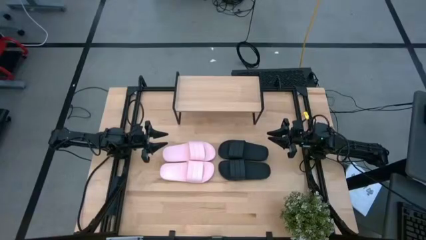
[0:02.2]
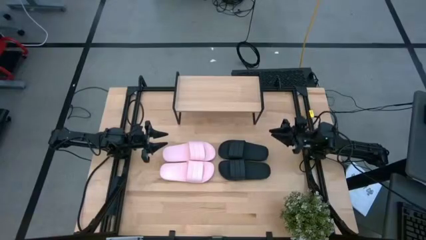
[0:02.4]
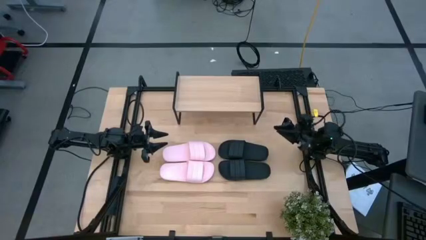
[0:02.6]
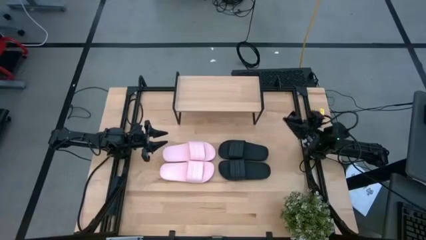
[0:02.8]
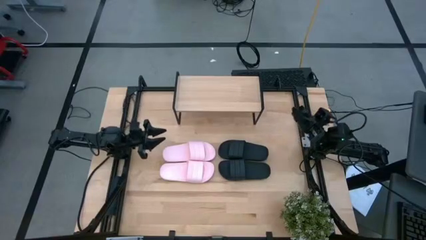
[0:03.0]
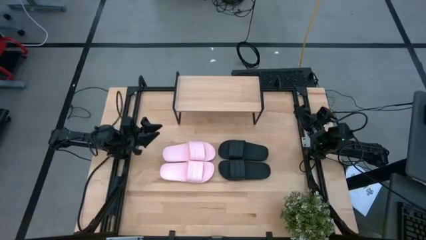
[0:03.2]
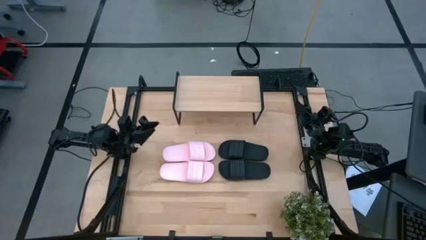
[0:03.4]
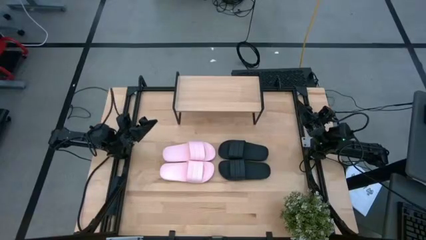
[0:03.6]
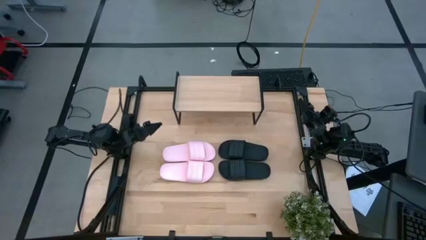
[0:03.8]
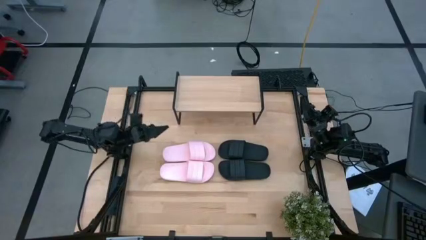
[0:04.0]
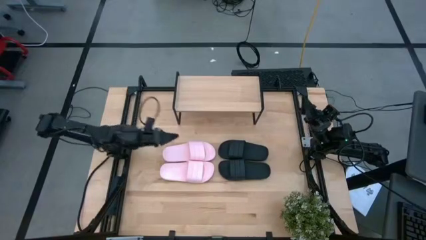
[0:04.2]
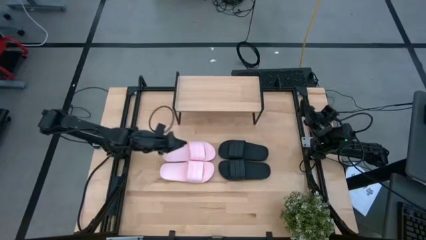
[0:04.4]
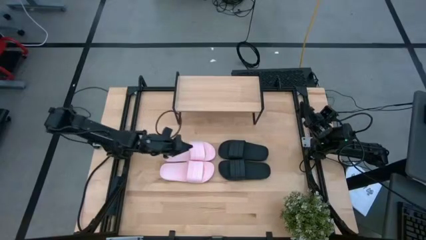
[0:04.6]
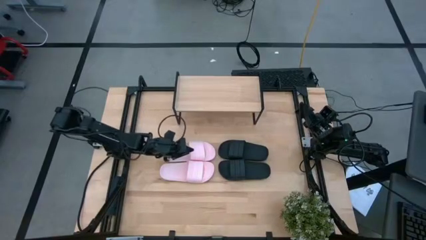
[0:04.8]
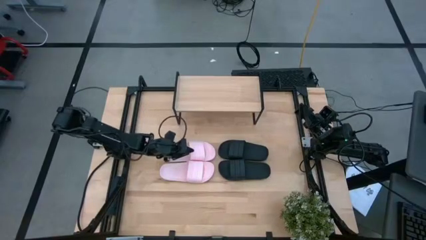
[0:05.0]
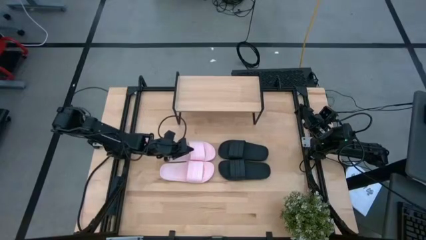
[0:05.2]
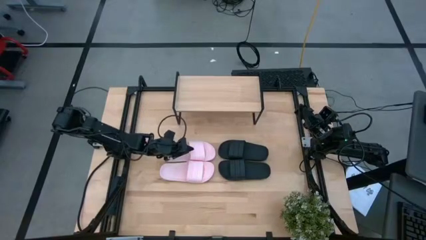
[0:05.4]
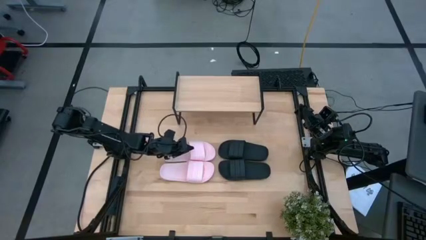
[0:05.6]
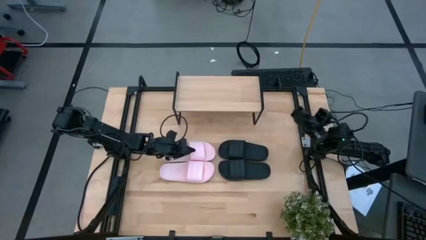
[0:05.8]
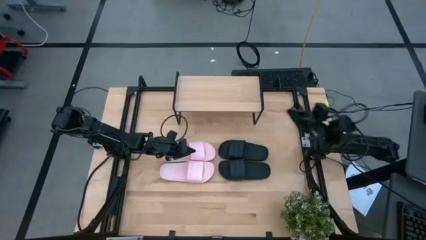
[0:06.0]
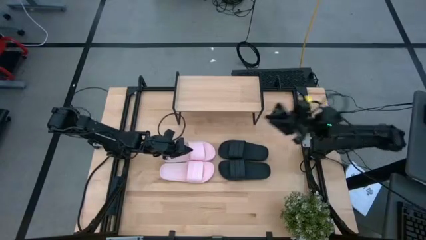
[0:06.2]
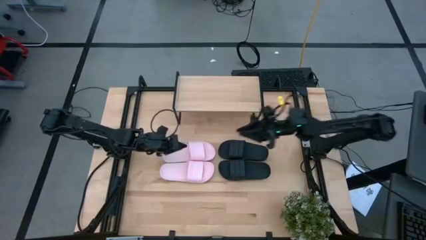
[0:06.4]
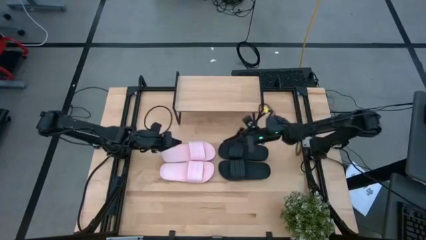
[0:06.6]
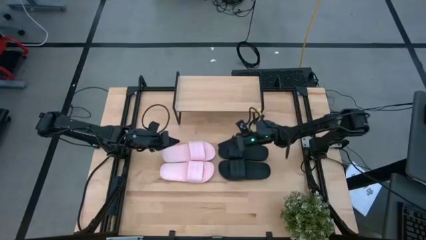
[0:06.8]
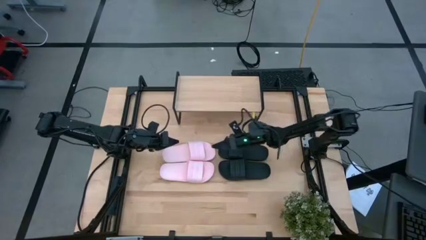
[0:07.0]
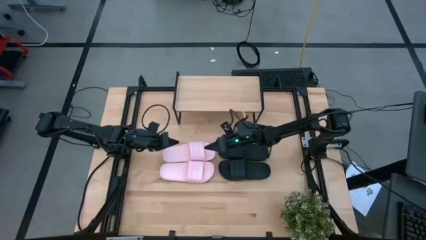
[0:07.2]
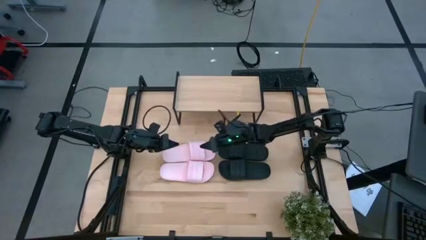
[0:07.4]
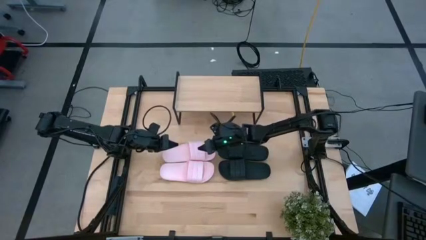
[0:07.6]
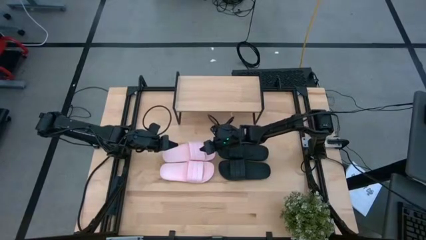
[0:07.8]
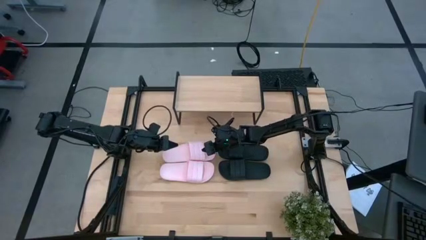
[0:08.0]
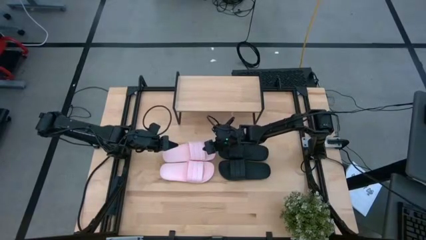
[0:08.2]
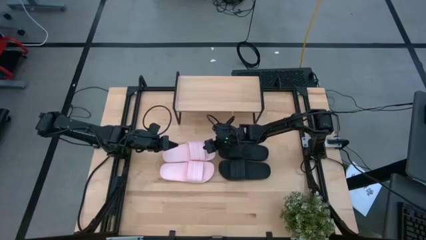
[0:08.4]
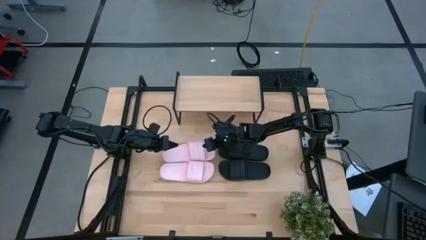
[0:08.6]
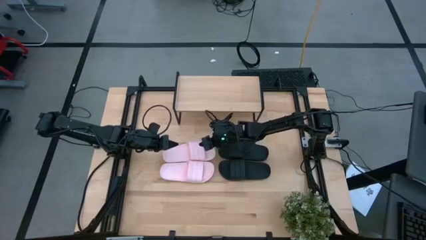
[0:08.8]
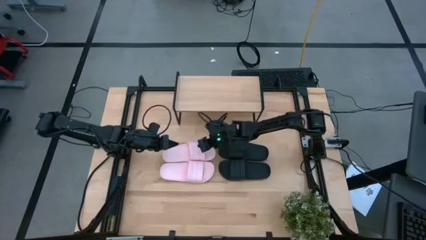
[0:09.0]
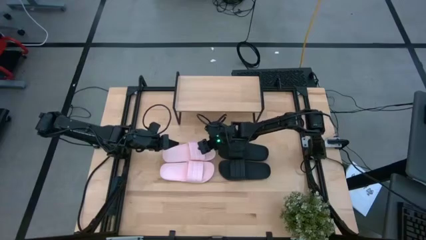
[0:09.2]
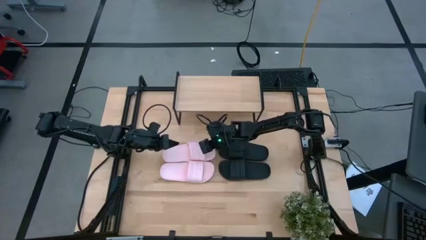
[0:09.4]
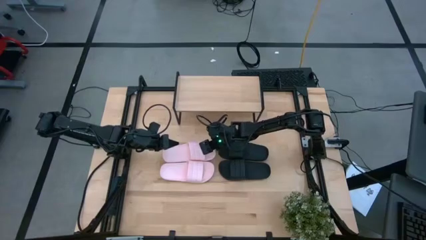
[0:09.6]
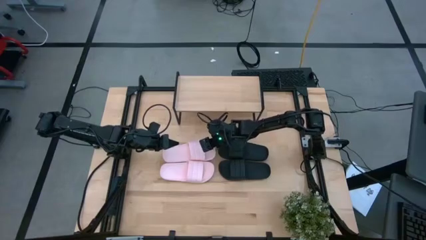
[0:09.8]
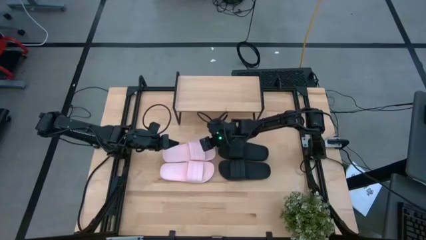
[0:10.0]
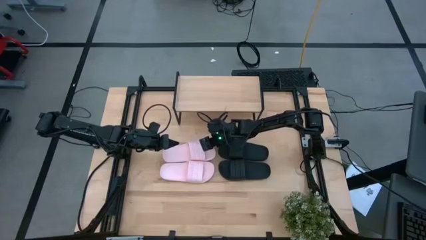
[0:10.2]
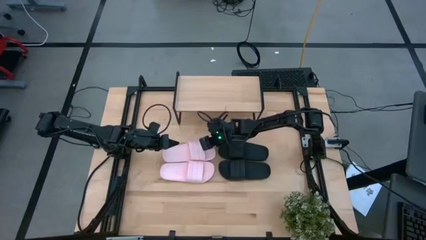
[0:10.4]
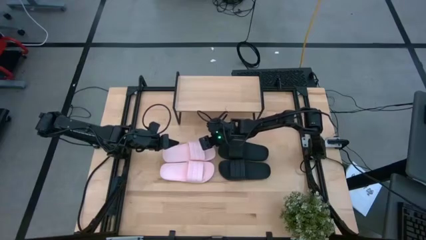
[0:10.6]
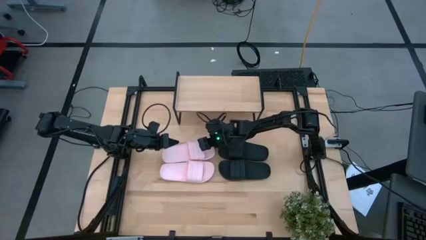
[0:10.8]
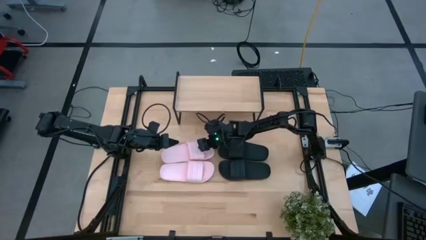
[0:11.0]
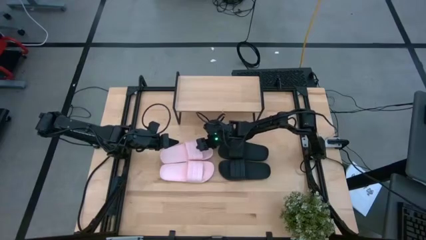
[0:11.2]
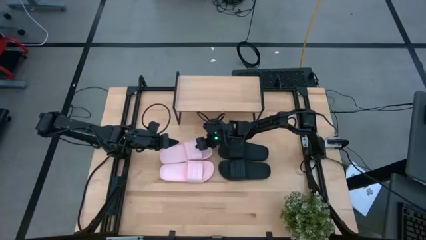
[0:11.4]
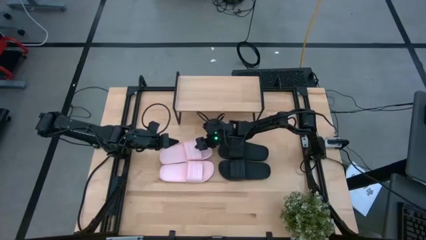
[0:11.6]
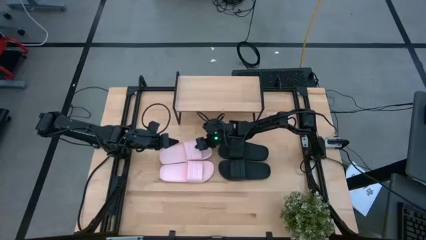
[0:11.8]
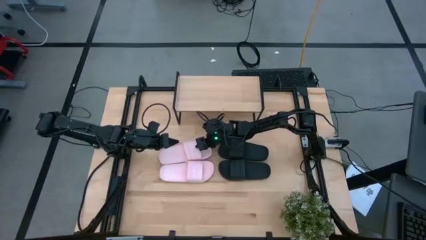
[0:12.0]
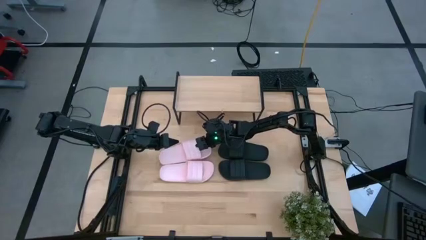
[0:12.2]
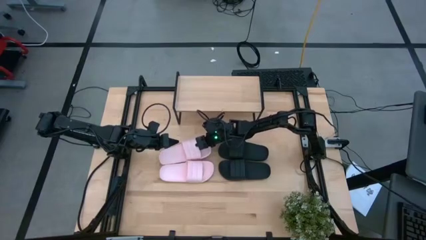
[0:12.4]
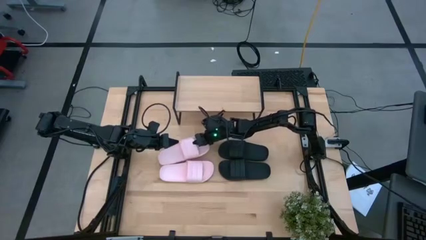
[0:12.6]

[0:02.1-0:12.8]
Task: Pick and place slides into the shelf
Put the top pink slides on the shelf

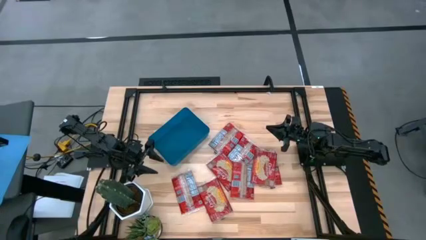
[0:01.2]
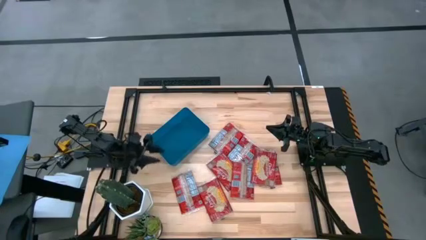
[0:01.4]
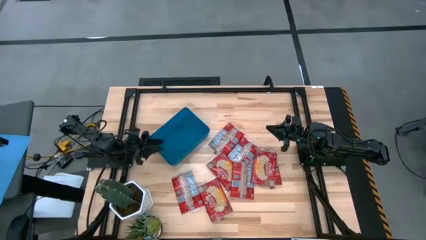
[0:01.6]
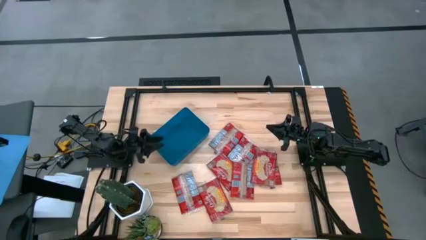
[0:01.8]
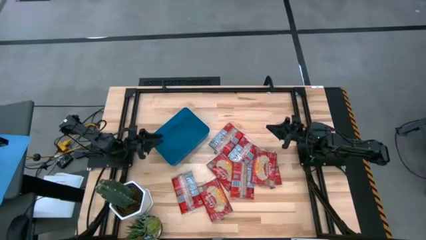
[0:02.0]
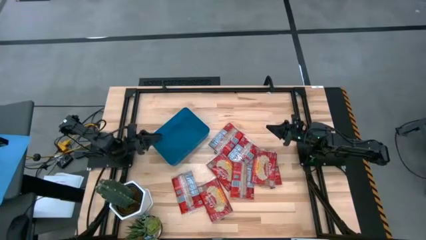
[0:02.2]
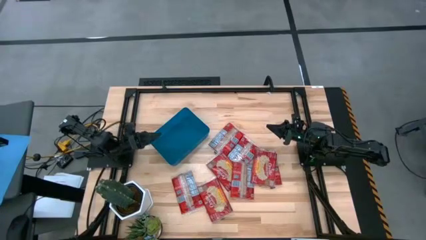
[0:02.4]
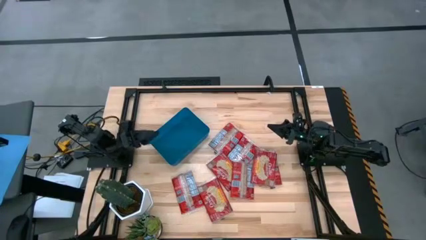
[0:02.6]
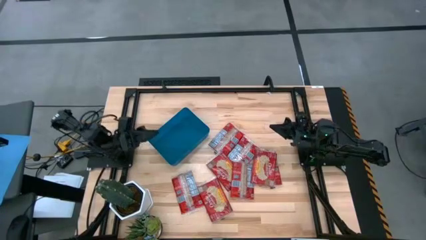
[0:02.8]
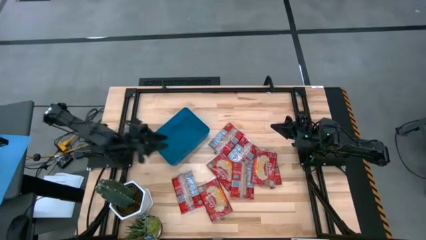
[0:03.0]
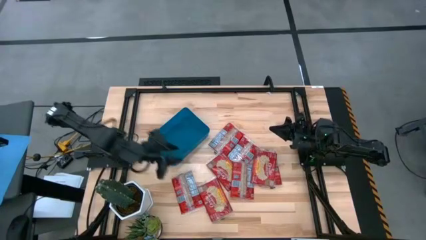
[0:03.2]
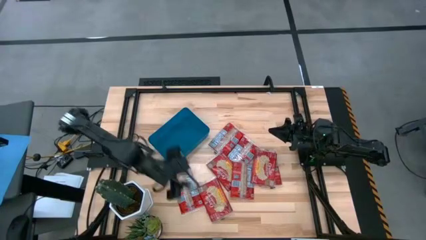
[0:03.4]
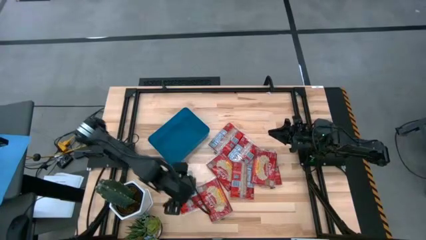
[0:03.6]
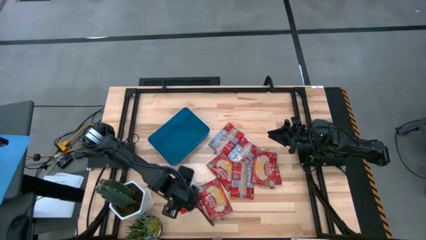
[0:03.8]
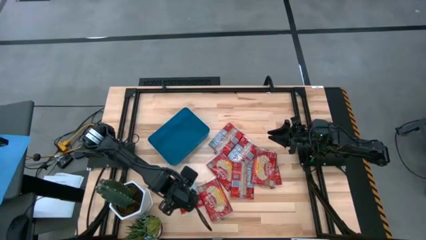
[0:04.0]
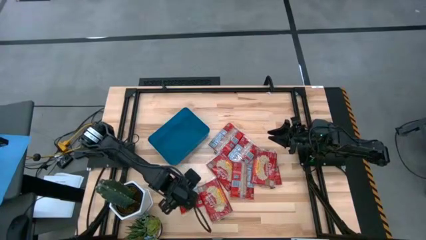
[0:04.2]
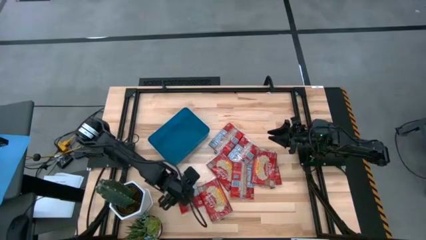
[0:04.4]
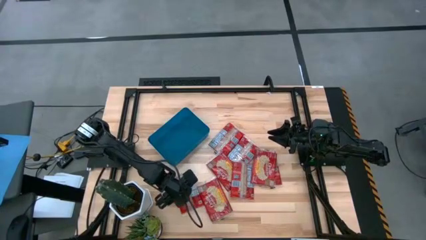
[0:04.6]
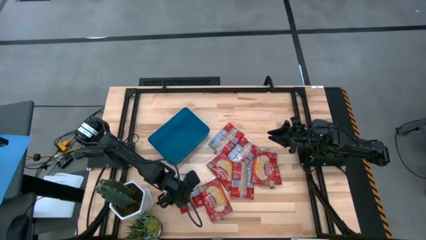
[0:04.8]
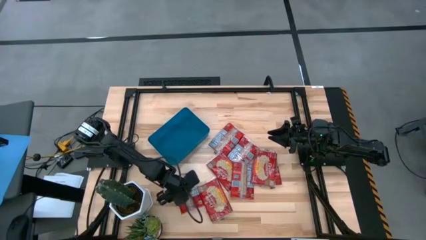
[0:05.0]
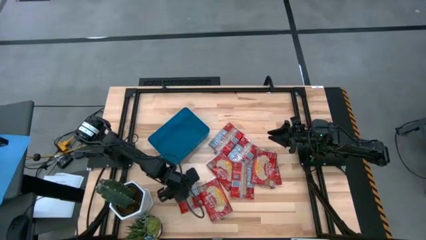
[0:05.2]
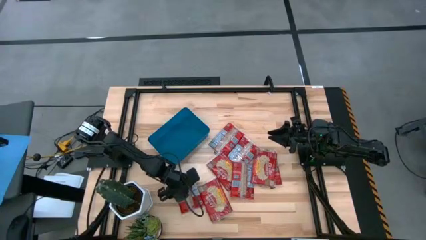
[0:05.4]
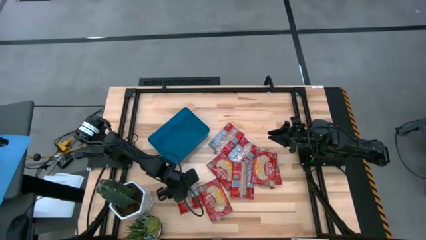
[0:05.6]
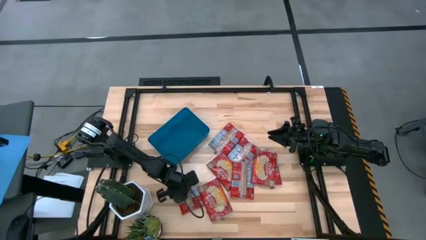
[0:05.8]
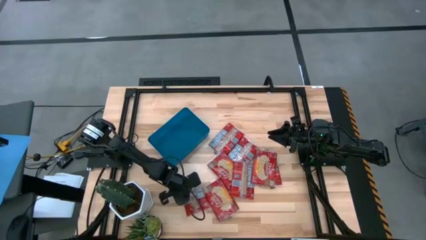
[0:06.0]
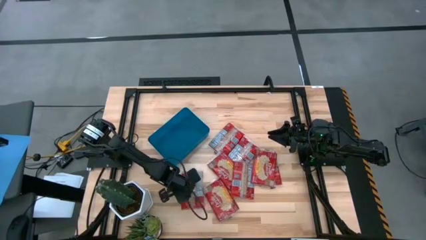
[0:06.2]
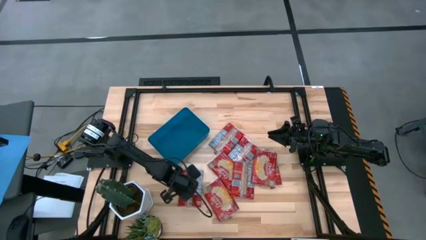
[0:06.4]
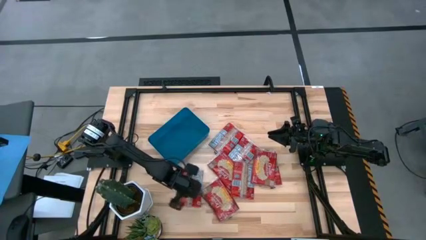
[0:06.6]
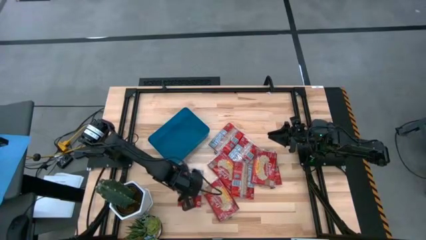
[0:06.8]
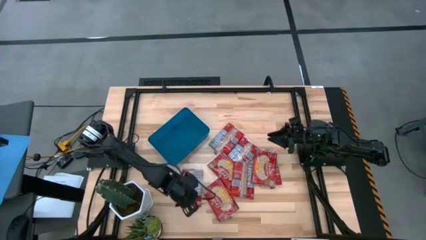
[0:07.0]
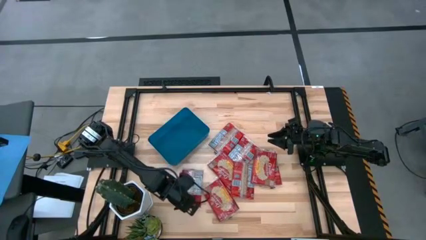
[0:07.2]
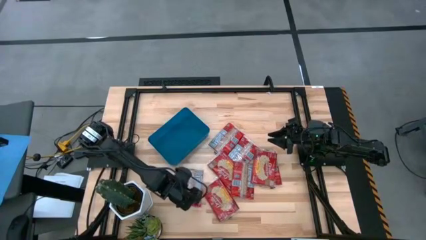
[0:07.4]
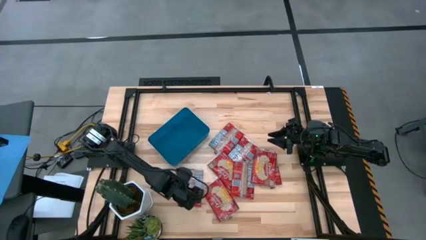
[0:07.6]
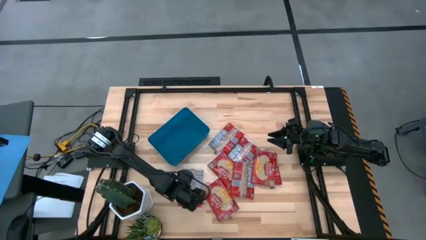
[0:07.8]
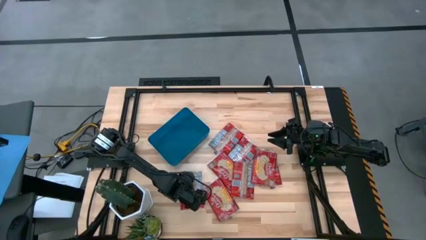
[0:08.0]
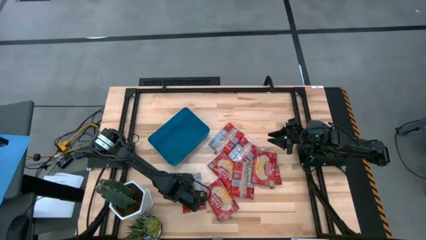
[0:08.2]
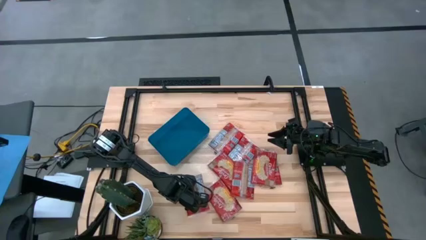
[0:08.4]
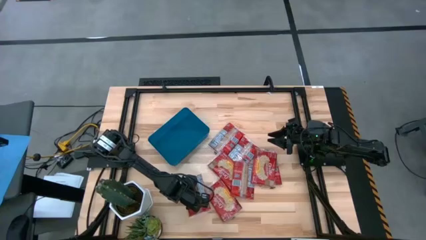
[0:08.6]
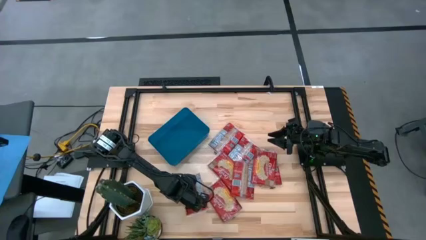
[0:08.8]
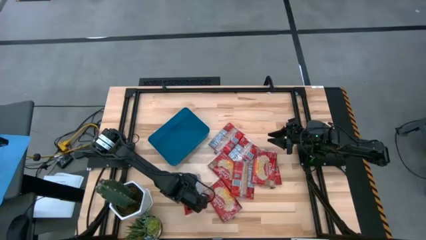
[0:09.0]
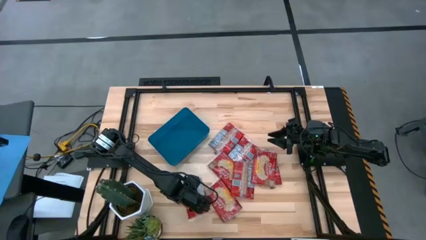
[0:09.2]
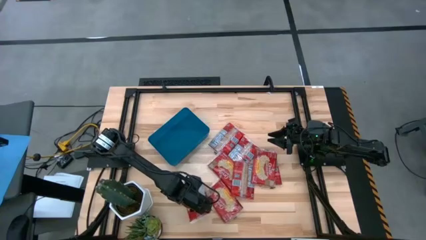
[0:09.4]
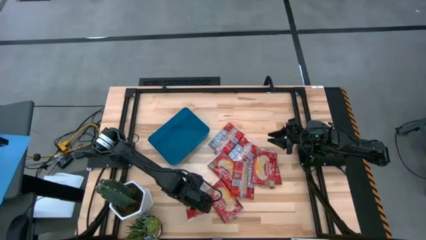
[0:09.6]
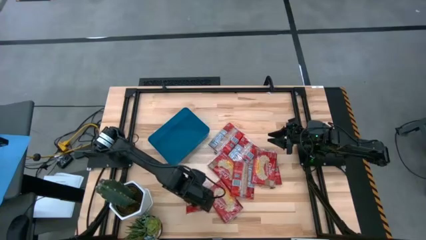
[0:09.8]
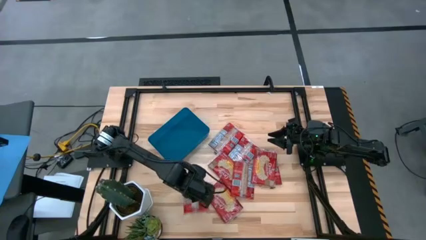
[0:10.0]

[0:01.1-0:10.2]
Task: Sort popcorn bags into baskets
Put the red popcorn bag into the blue bin
